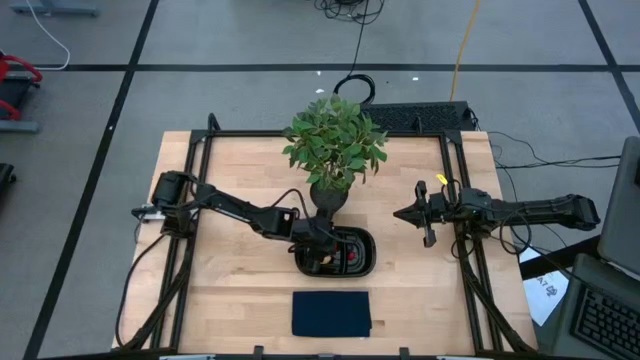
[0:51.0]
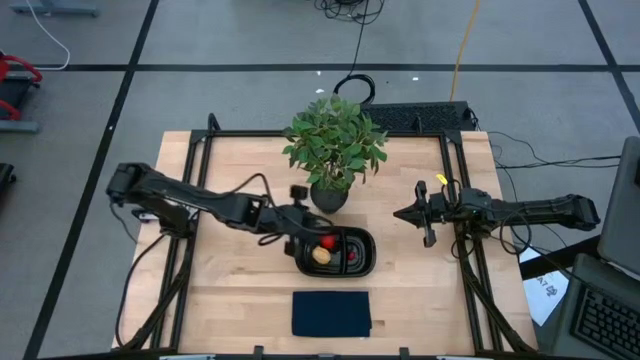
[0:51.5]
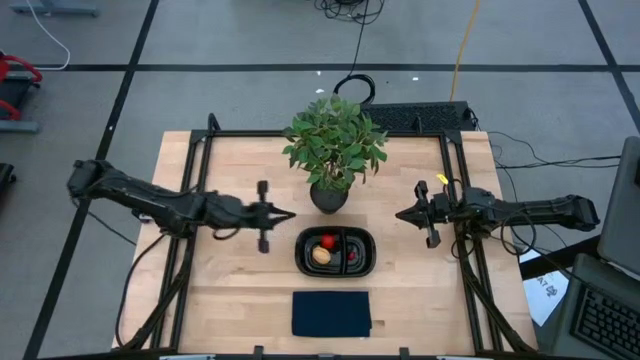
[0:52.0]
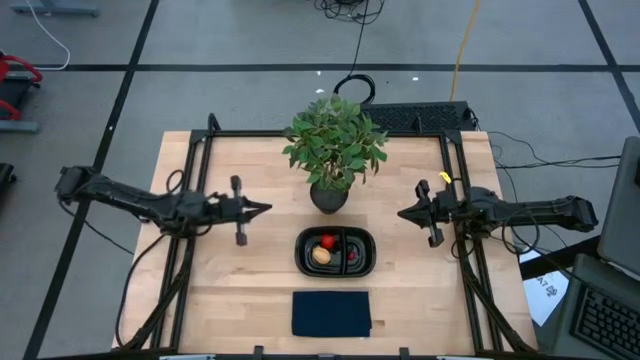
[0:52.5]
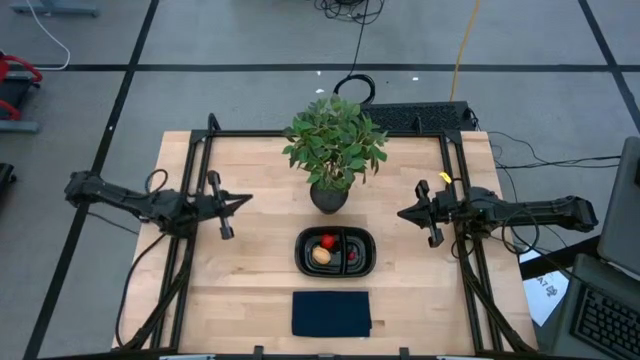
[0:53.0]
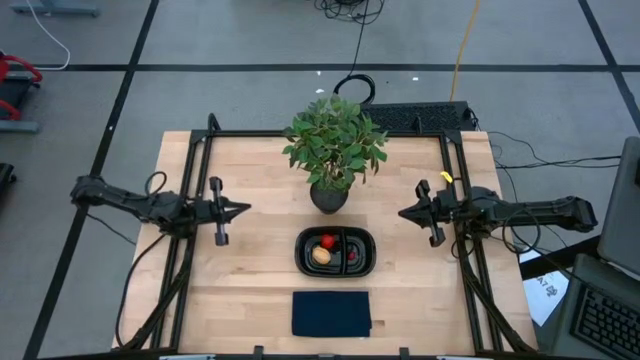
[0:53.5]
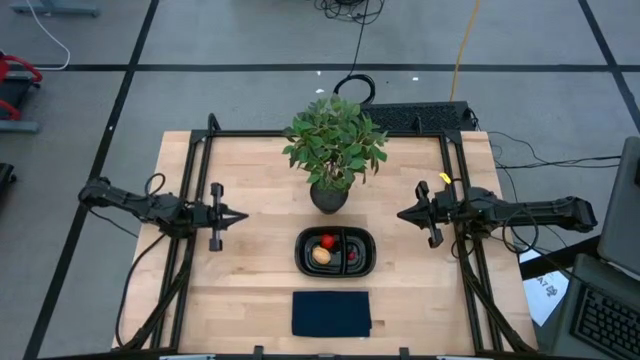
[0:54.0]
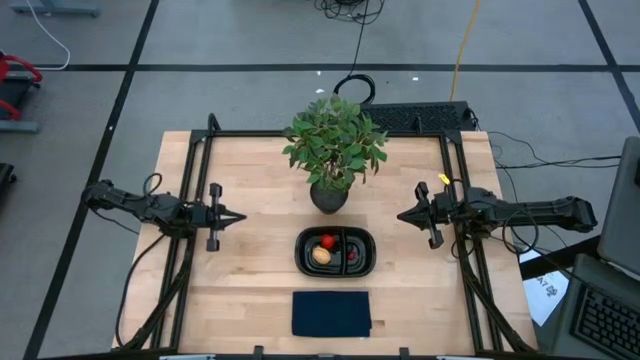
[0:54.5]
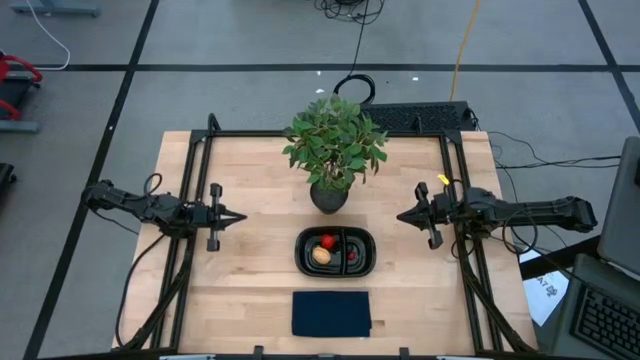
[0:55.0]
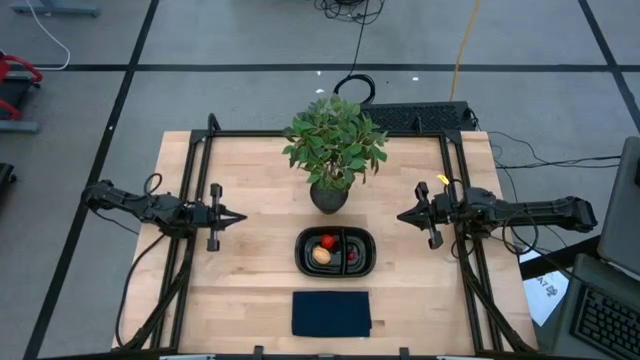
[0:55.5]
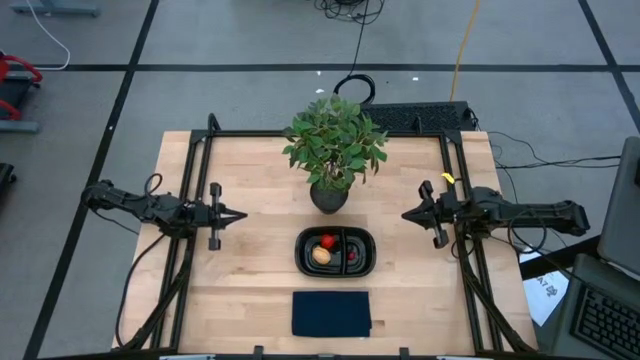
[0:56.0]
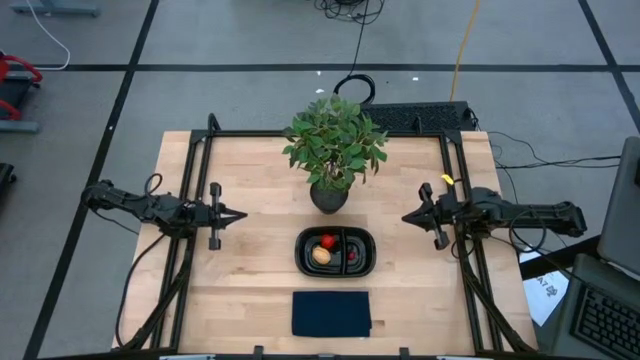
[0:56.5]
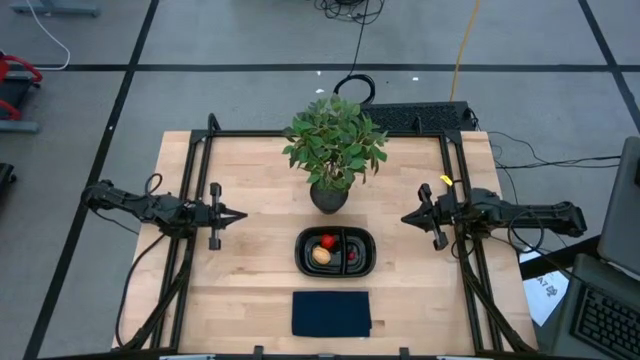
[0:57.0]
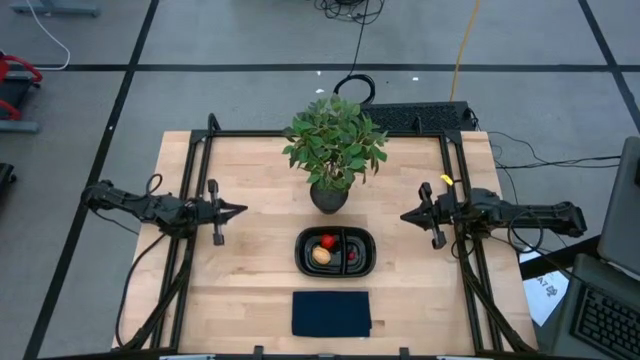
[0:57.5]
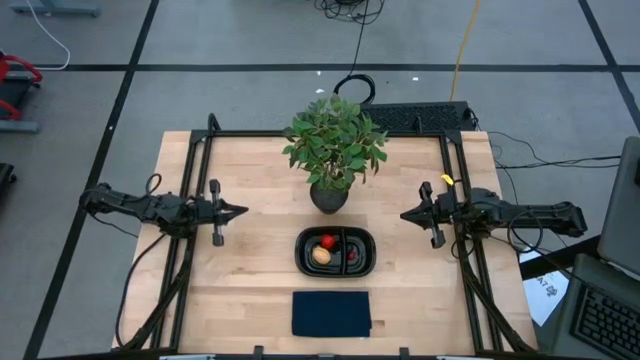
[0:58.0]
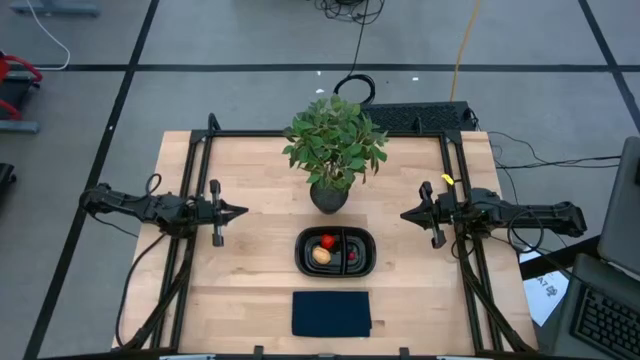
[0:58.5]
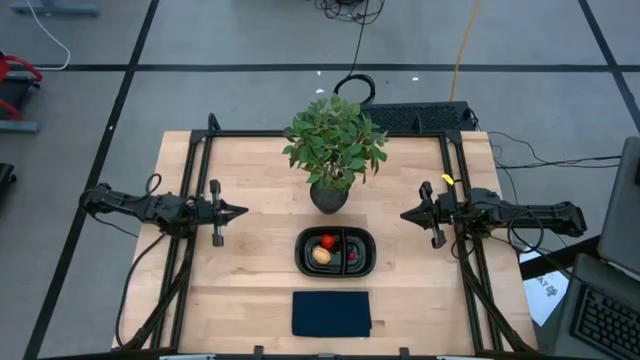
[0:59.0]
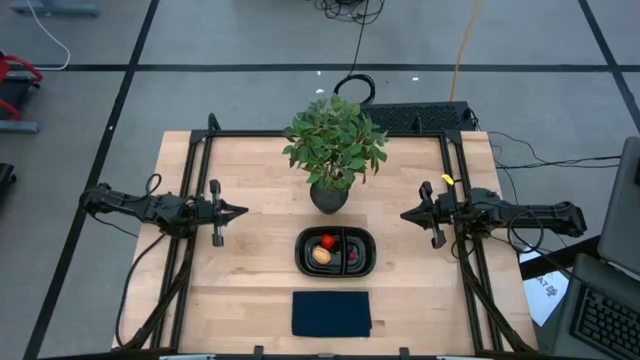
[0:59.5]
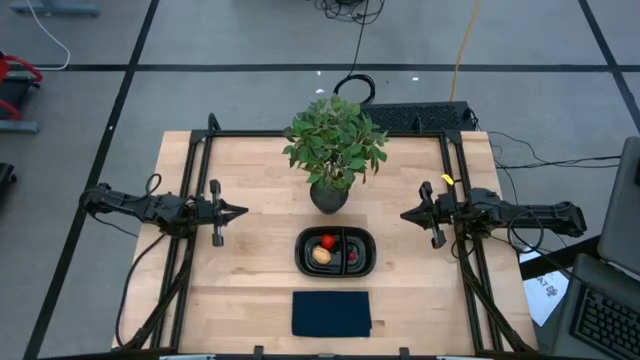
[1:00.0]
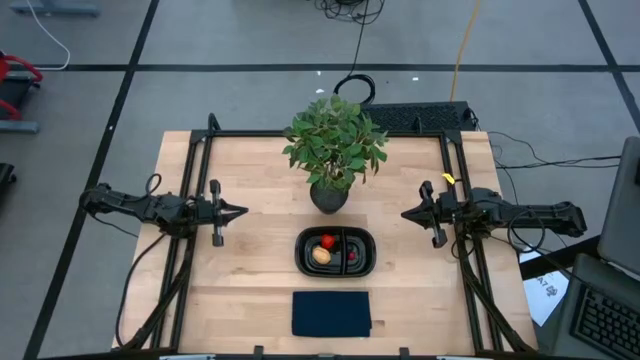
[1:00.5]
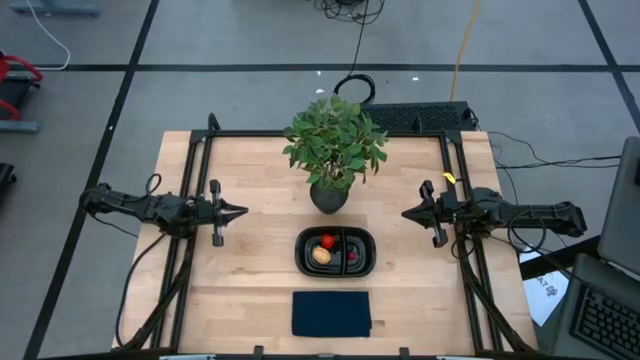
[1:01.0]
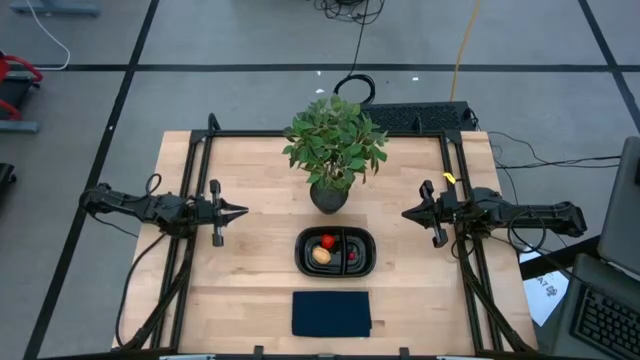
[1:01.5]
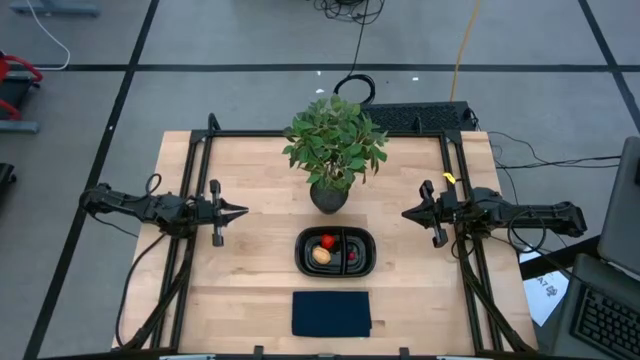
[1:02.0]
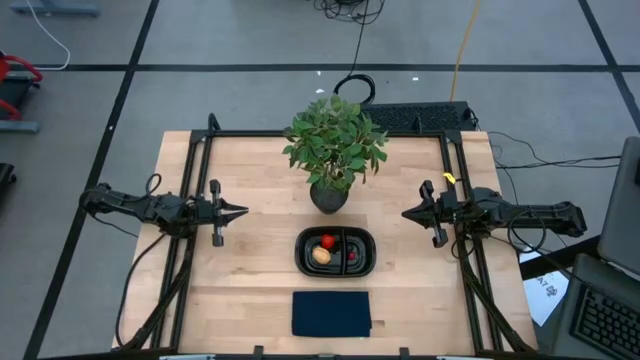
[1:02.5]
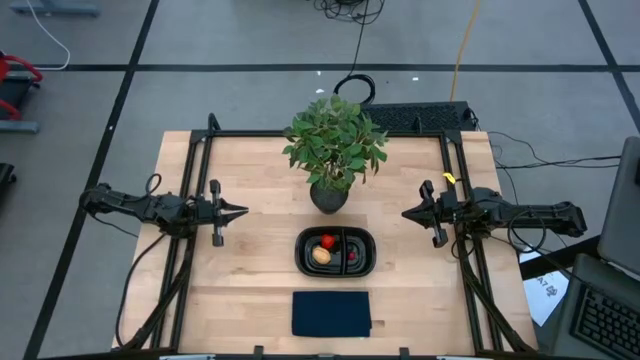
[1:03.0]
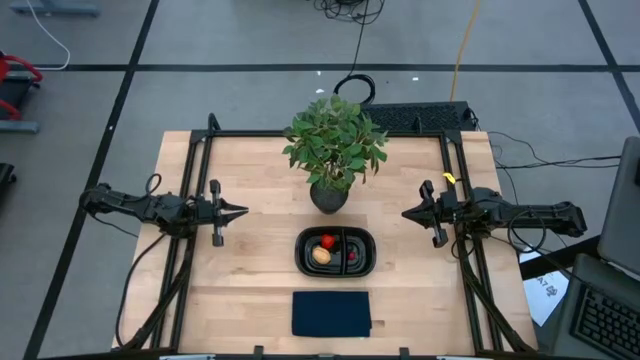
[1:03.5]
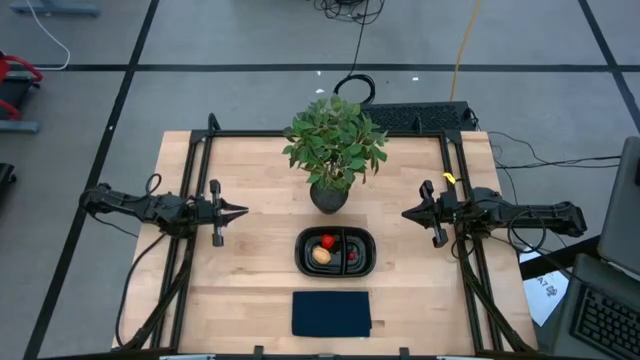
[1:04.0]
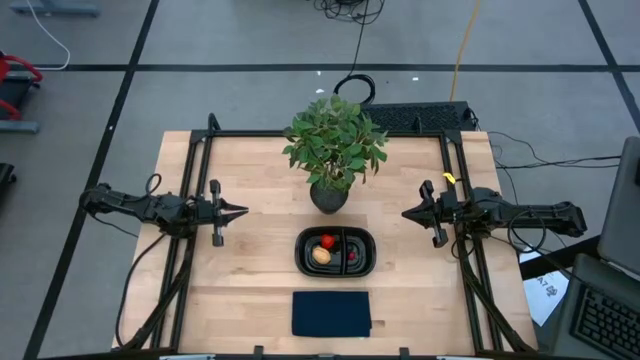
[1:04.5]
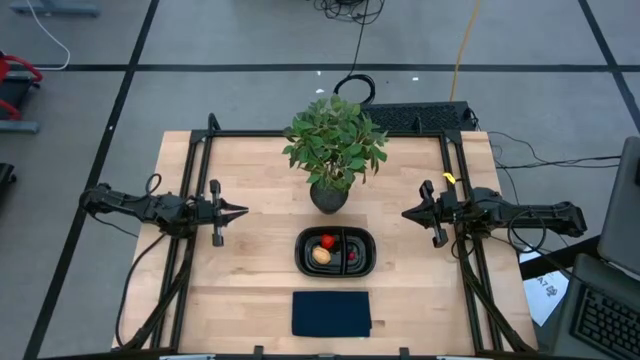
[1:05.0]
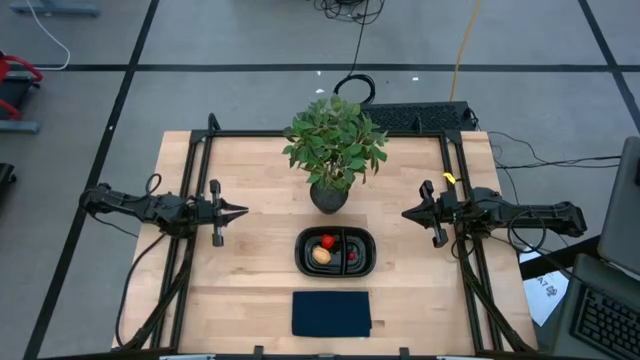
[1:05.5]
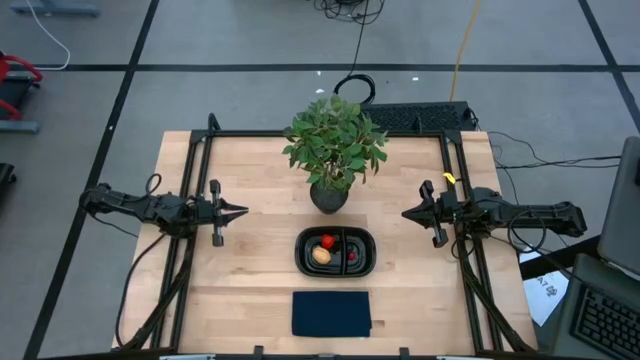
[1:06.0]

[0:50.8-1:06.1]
Task: Pick and placing Produce into tupperware
Return to Home Position
